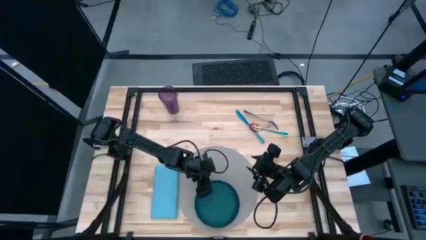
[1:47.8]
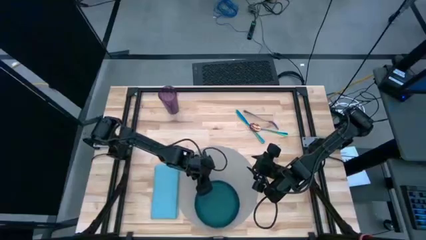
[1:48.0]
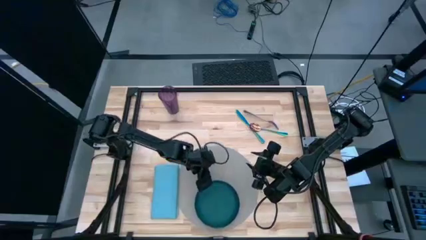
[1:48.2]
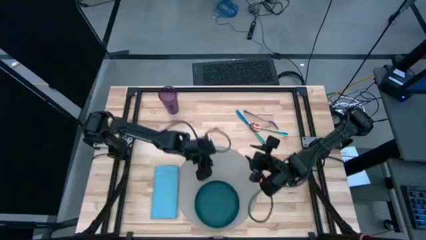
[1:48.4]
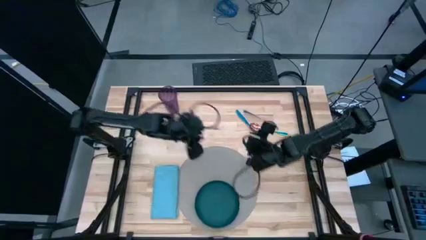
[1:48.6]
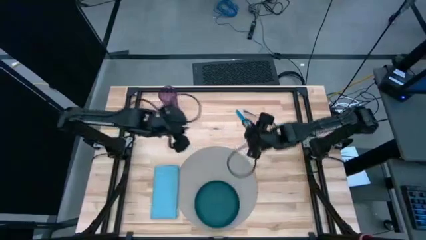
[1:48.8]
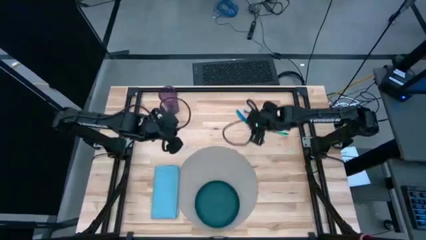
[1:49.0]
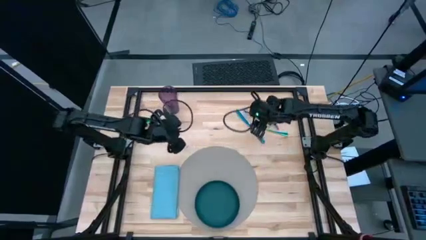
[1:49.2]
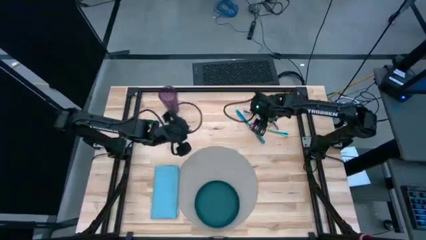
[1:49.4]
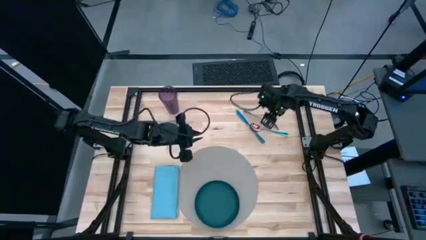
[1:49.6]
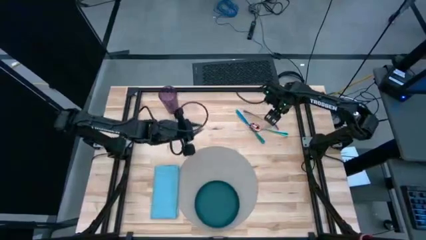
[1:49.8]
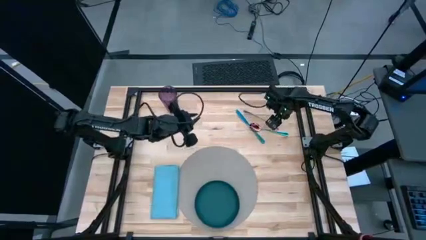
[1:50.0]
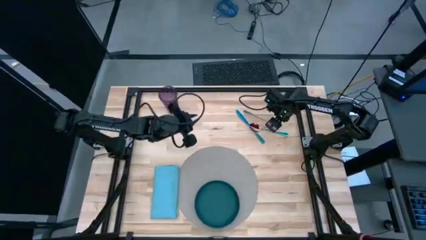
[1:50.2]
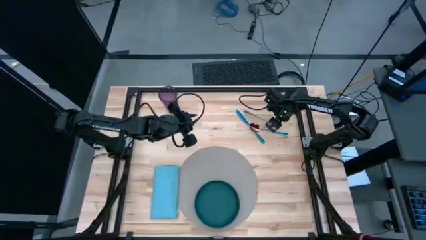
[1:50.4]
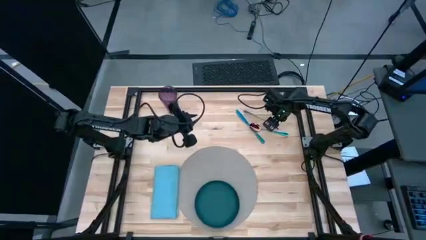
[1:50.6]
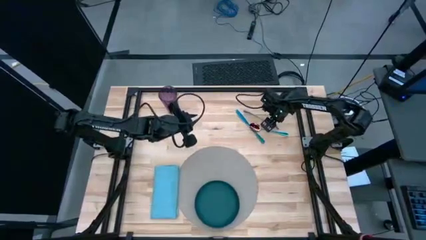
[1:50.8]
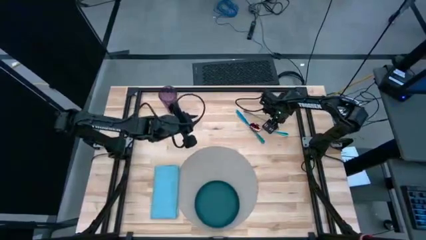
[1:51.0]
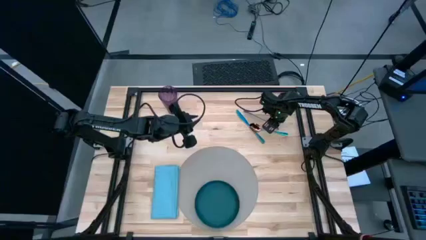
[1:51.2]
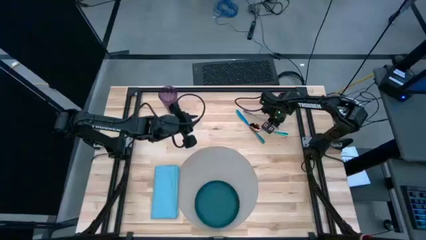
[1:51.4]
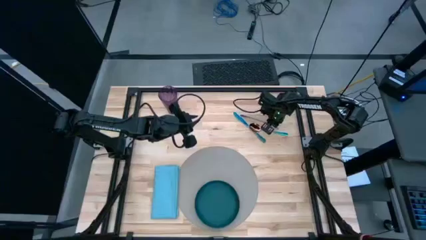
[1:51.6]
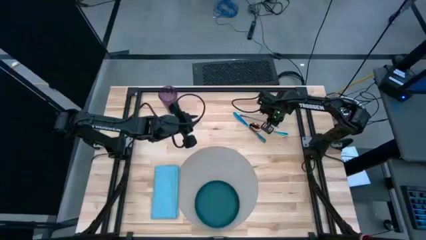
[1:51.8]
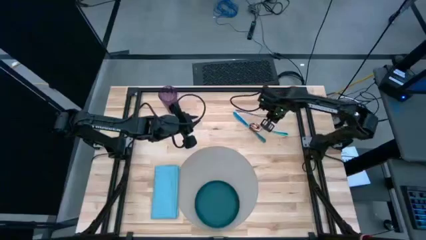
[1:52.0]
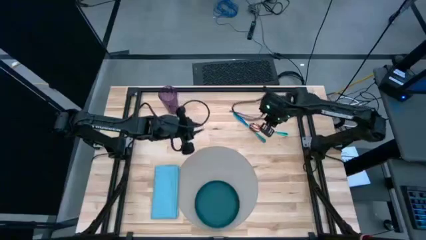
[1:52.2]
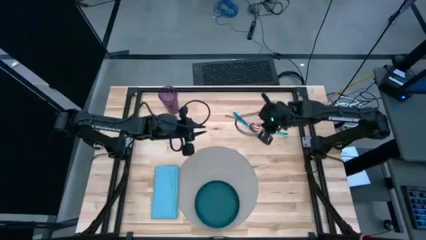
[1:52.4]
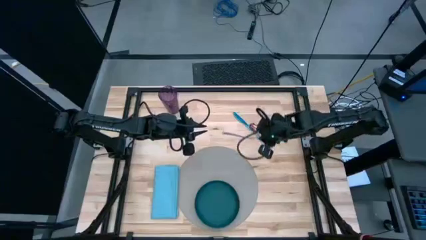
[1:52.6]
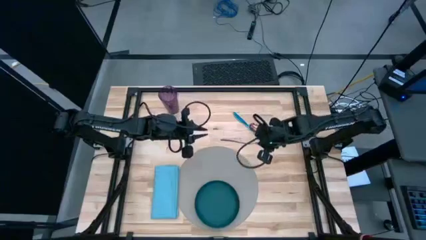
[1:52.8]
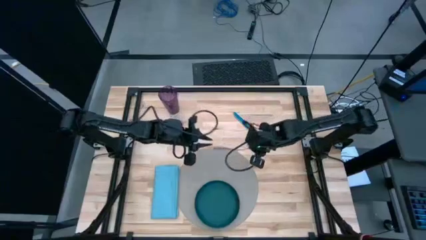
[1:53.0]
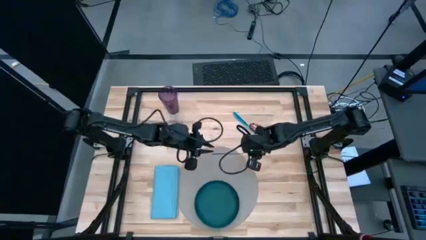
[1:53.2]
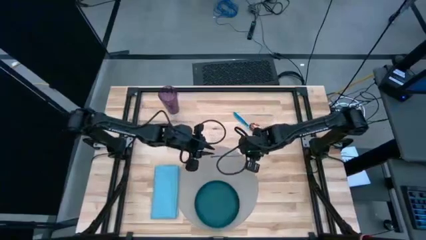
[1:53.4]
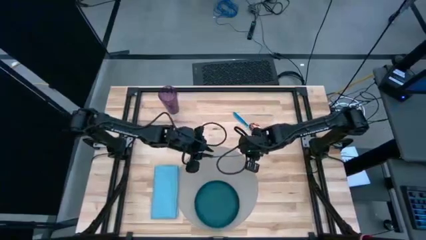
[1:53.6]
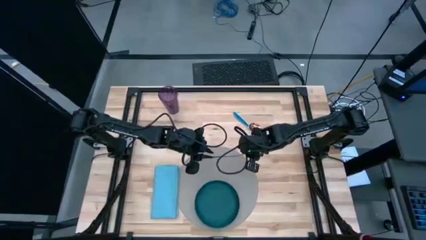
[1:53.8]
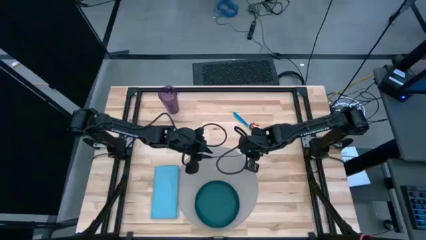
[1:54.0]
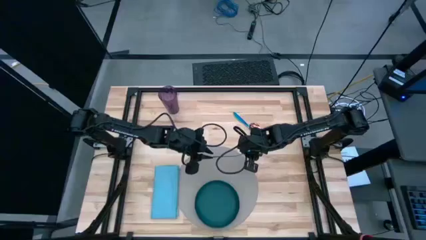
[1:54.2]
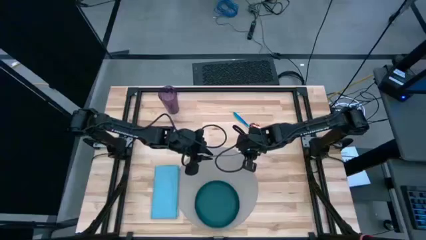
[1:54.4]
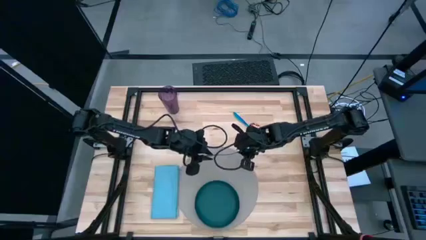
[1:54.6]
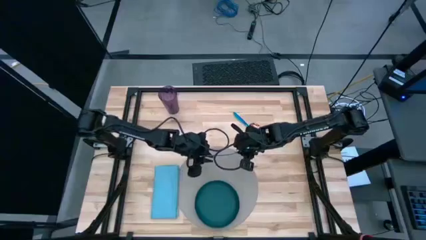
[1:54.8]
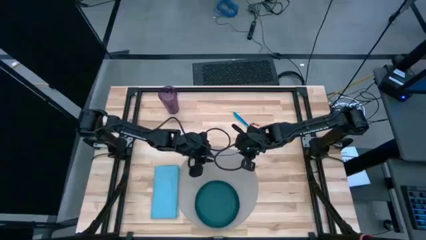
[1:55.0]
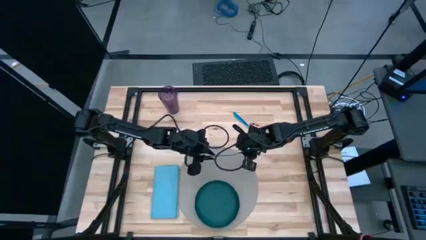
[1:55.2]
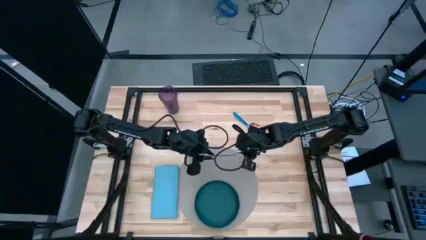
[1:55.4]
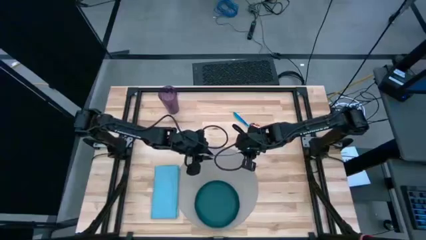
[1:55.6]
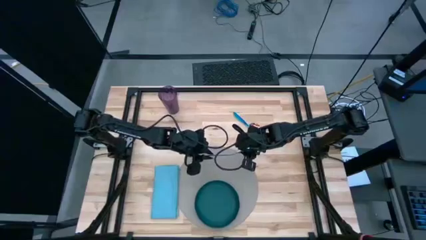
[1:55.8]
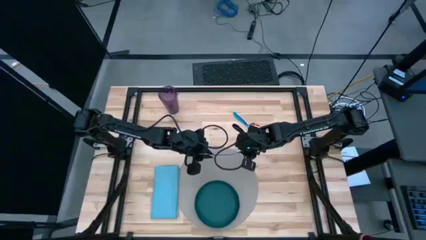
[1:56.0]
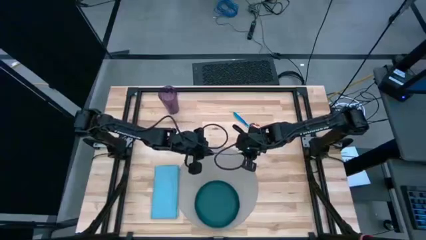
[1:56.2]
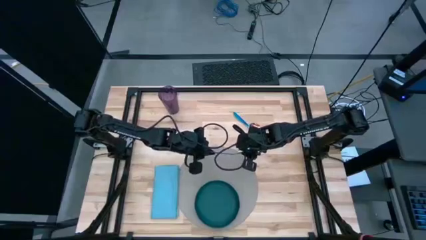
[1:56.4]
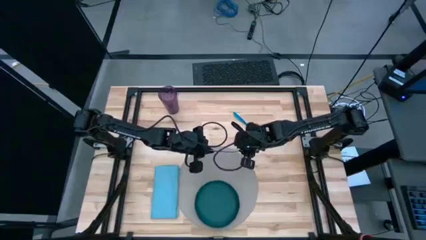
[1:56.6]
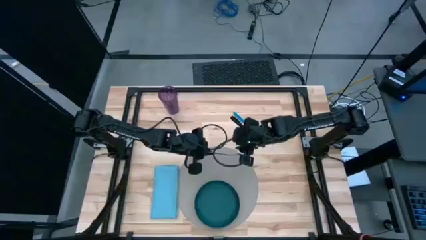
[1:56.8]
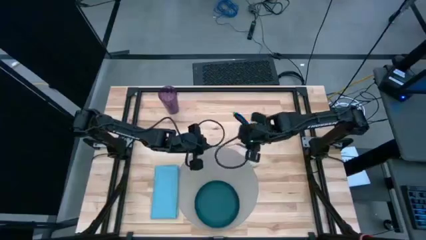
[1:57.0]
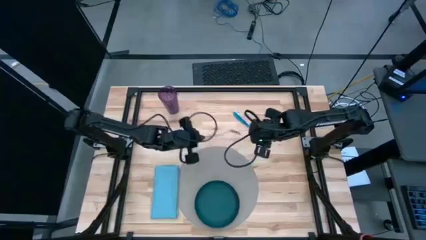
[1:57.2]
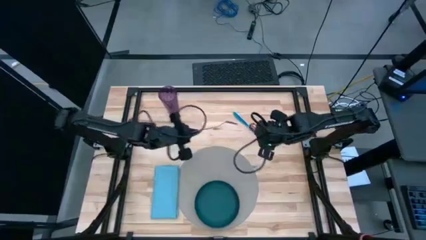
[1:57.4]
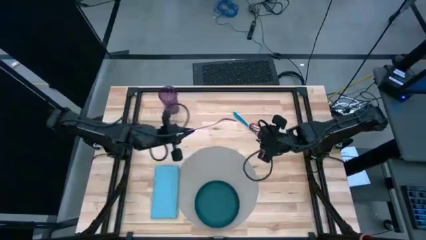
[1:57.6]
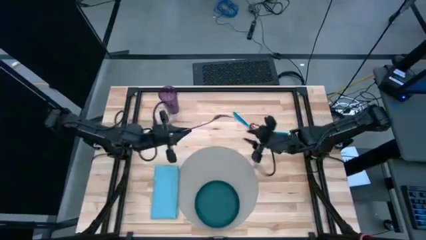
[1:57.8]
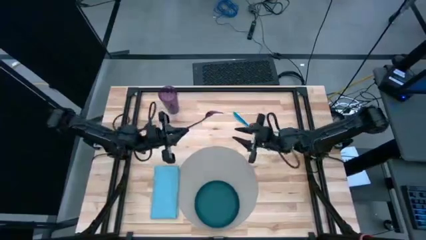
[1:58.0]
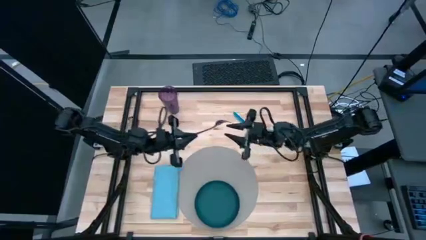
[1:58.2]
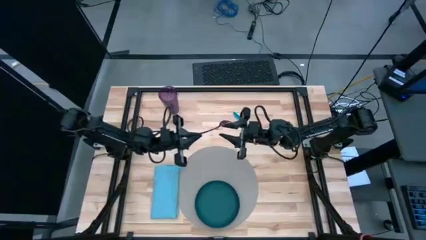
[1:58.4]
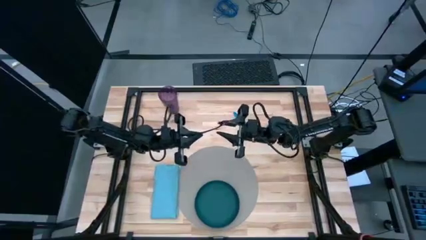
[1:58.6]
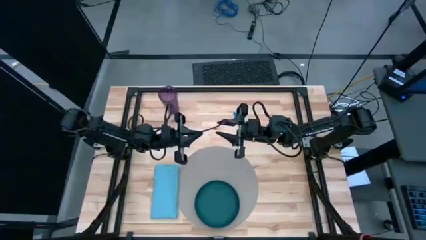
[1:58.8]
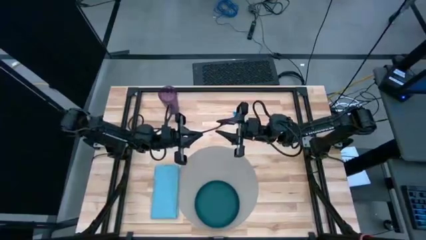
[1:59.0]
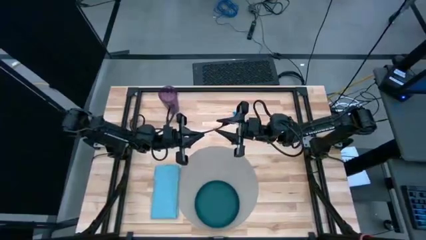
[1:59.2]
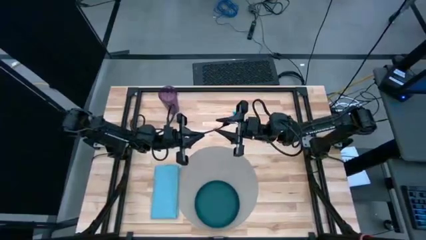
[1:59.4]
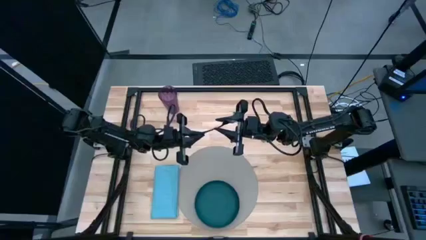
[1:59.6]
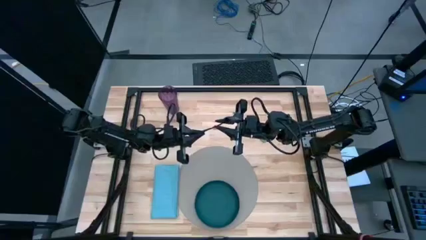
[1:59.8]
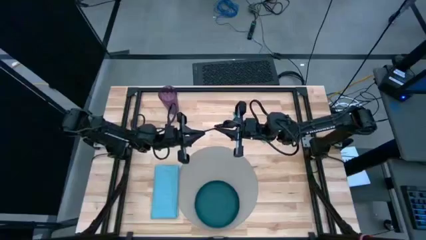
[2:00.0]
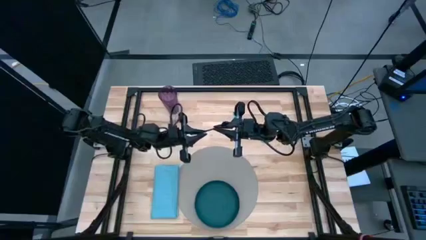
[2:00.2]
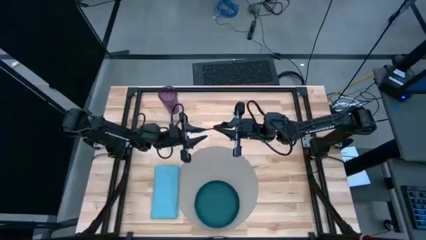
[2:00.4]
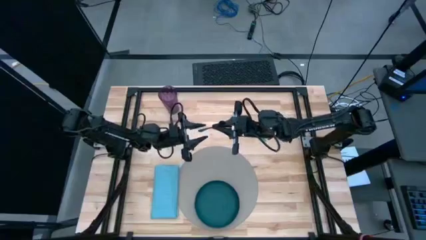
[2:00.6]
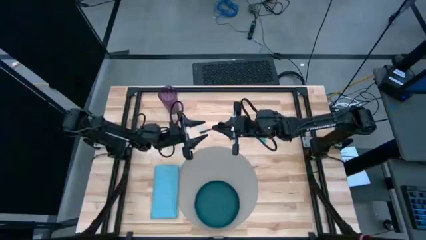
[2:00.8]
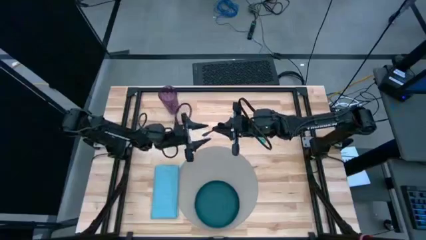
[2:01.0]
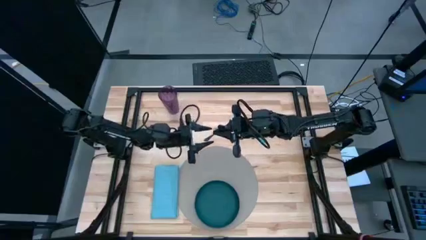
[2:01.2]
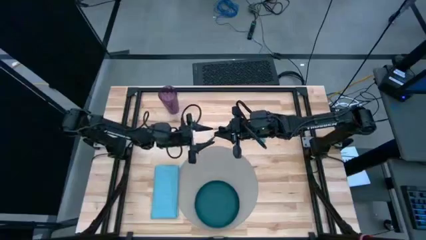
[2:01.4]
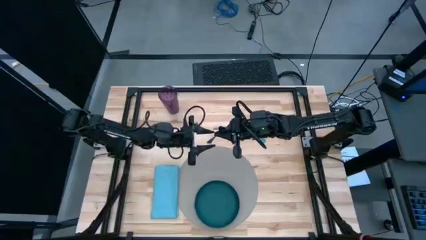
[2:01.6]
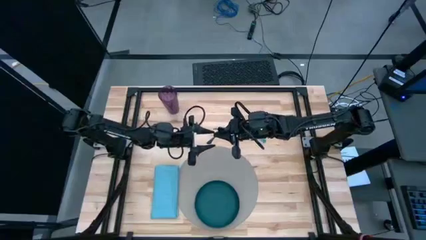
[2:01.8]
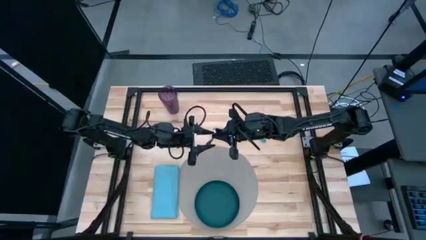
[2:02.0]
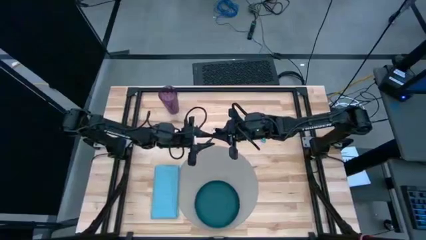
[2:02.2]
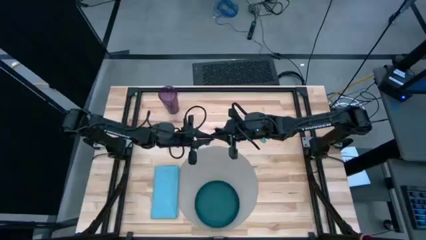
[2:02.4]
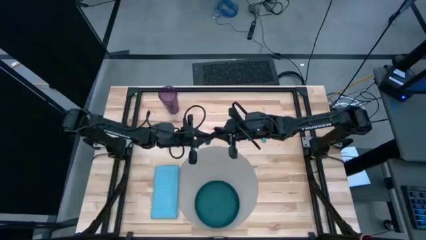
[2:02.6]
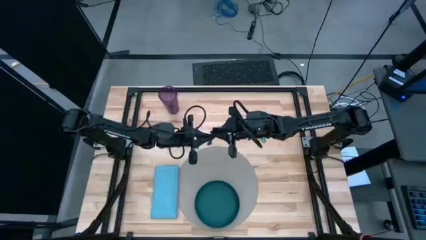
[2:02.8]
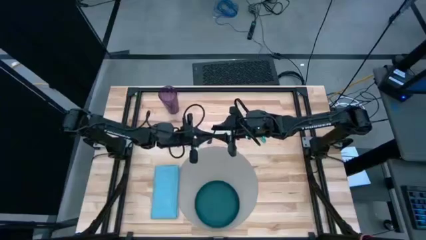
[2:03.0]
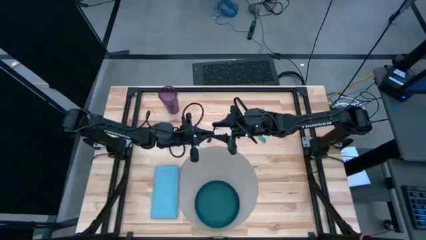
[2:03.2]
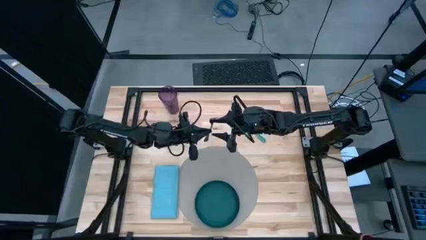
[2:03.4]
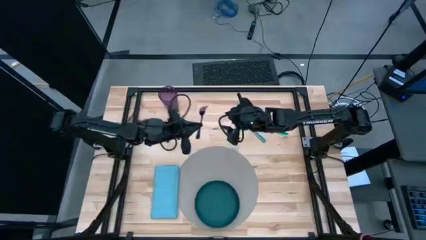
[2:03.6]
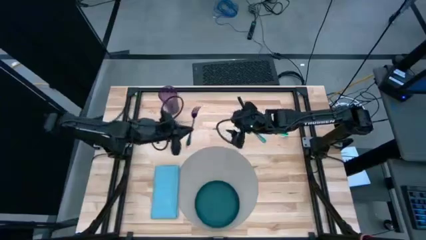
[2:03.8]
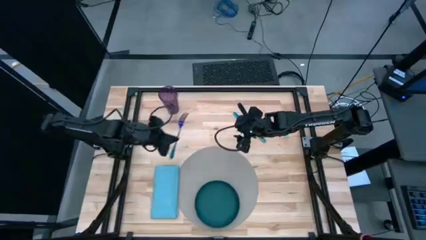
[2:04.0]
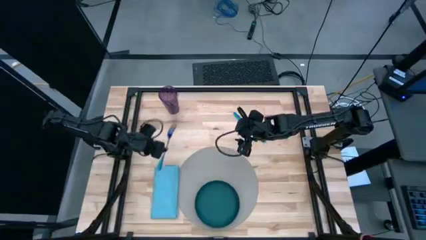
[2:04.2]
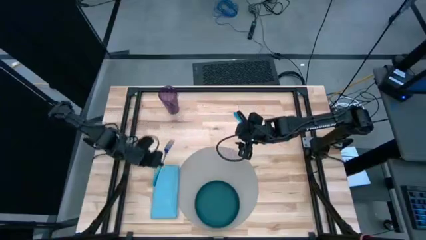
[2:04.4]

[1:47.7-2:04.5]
Task: Set table place
Put the blue fork on top of the blue table napkin

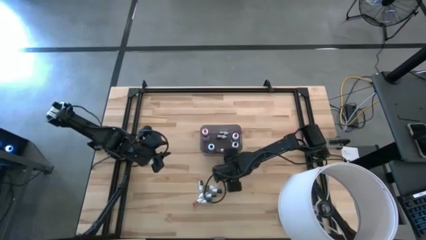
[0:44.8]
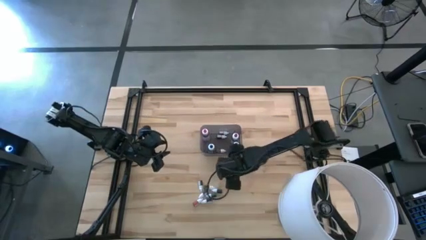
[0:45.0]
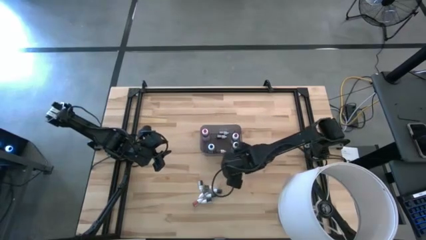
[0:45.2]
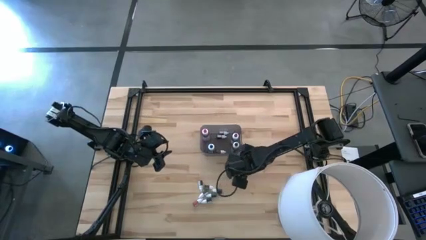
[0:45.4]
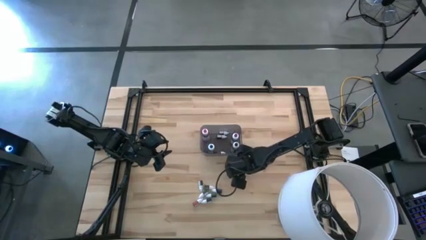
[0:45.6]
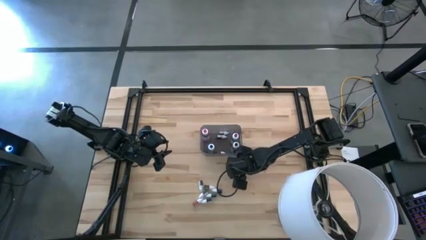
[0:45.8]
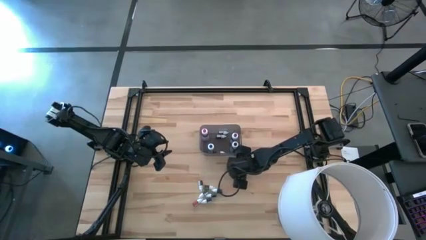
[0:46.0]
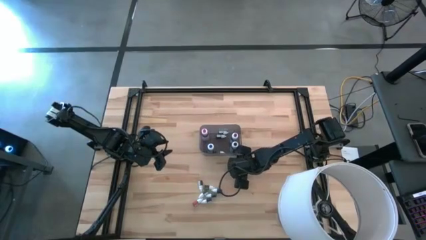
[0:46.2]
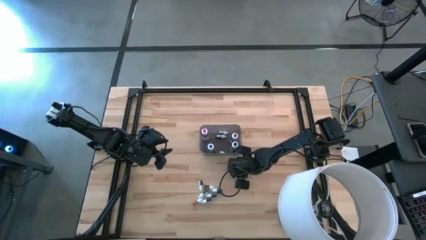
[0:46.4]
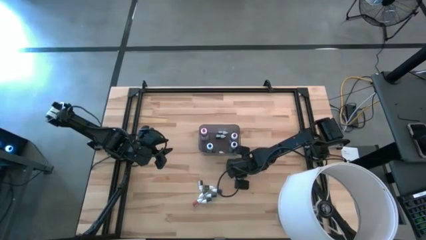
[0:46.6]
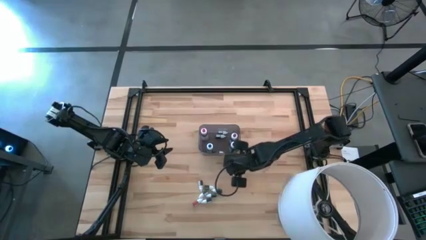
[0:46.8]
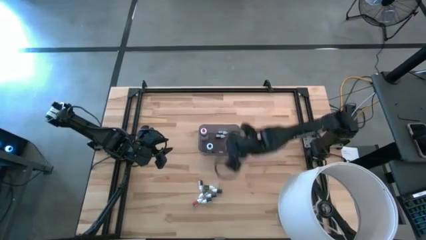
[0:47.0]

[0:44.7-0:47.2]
Task: Pick & Place food coloring
Put the top small red food coloring bottle in the black bin
